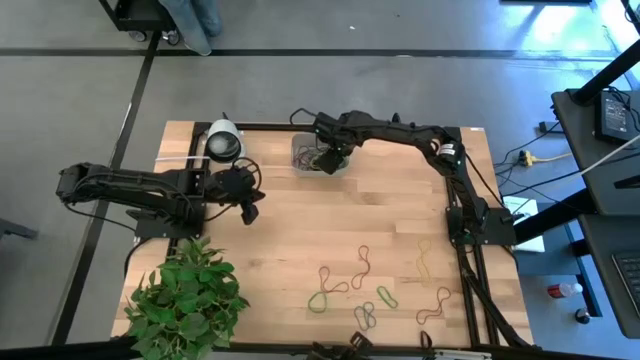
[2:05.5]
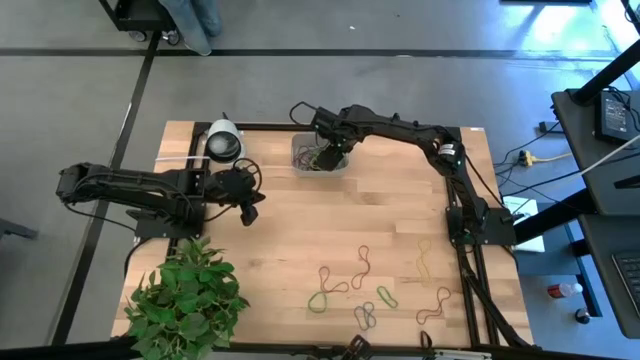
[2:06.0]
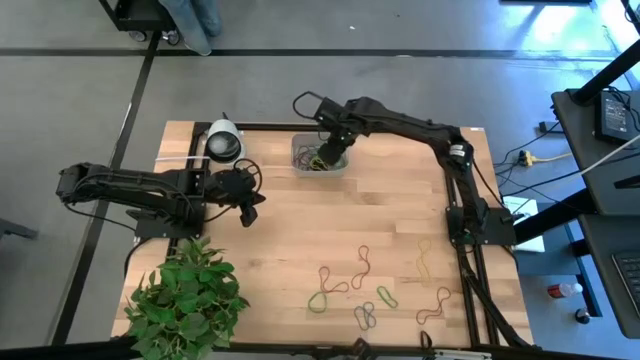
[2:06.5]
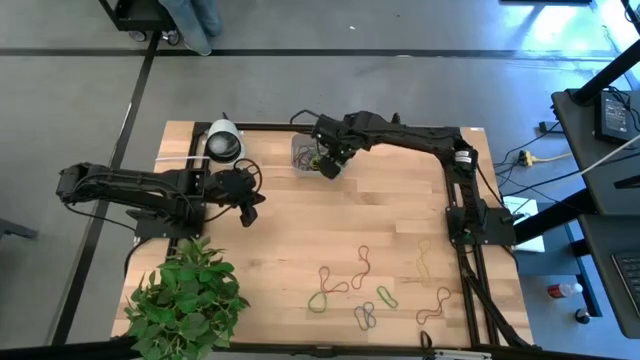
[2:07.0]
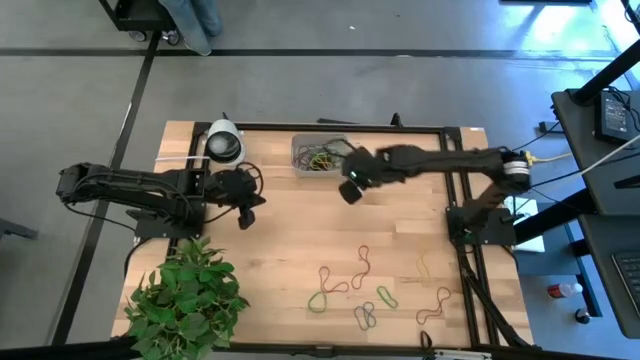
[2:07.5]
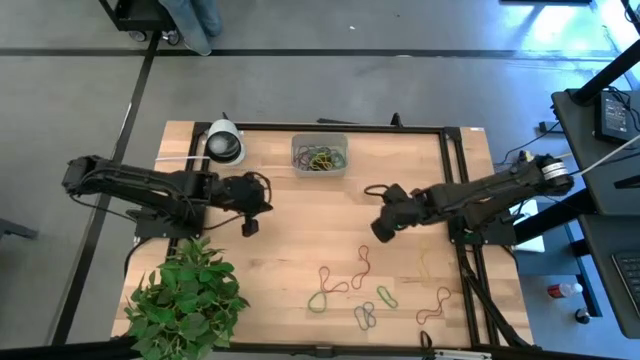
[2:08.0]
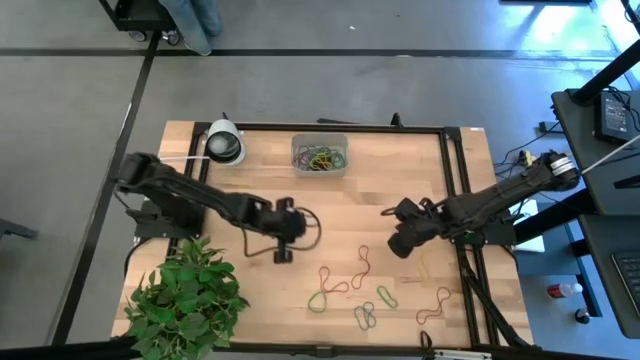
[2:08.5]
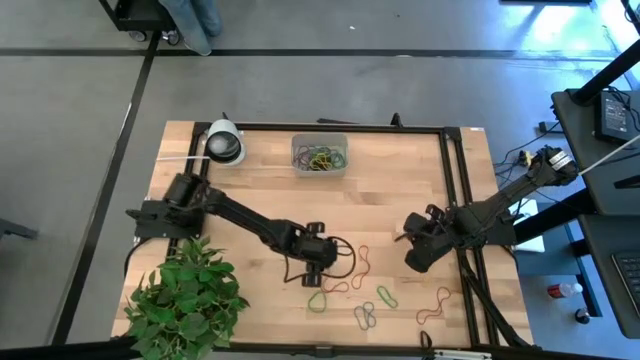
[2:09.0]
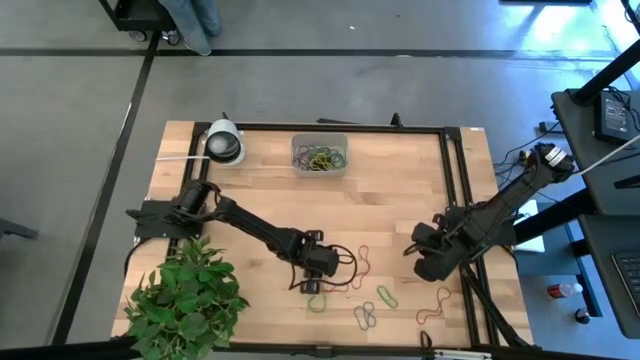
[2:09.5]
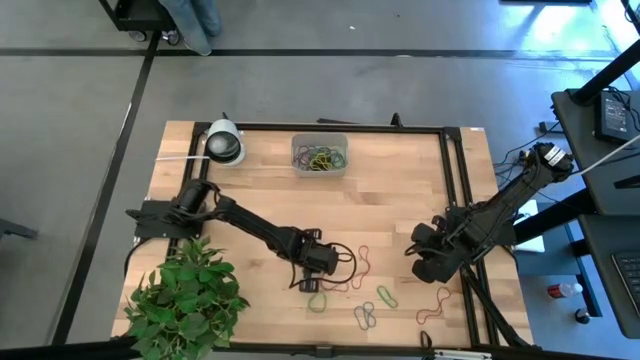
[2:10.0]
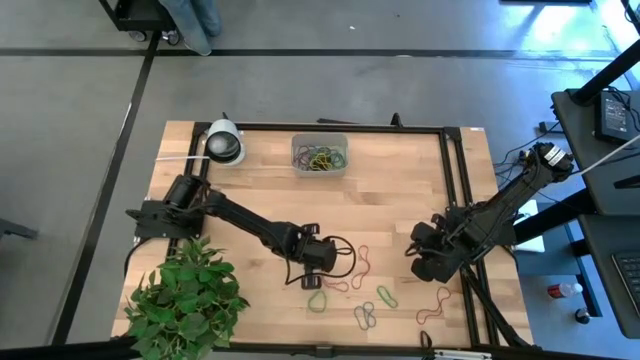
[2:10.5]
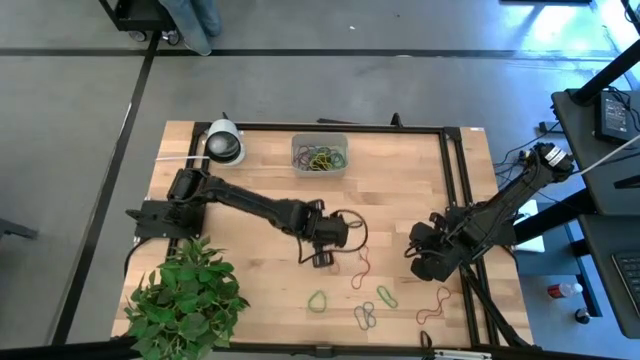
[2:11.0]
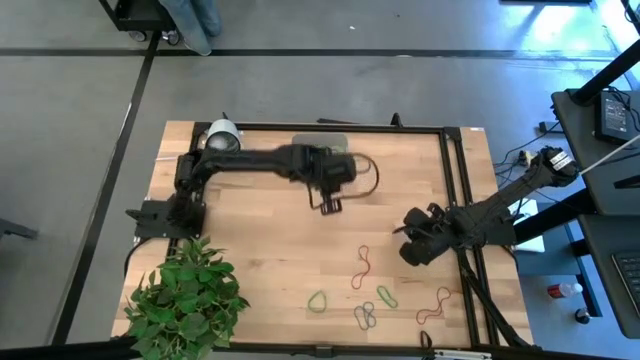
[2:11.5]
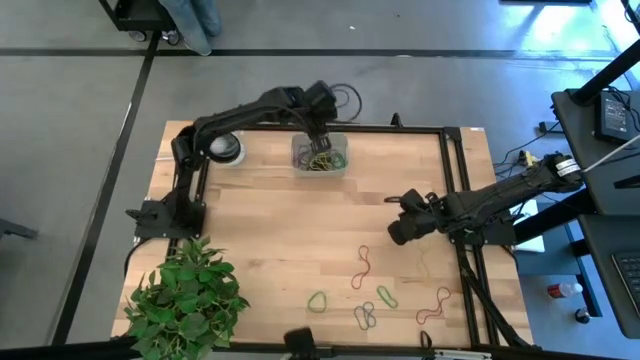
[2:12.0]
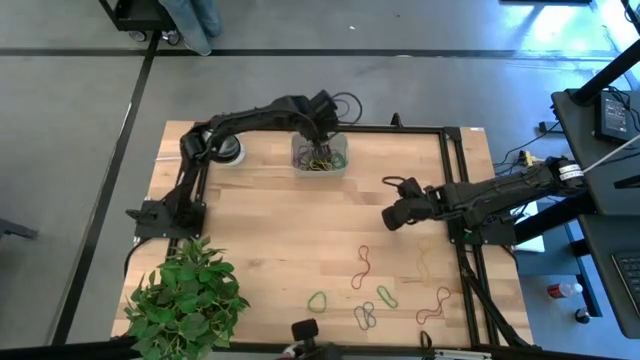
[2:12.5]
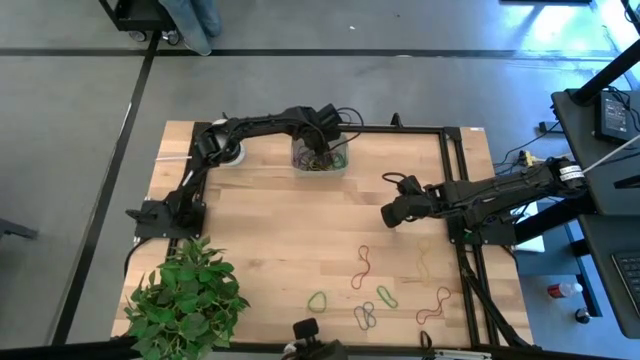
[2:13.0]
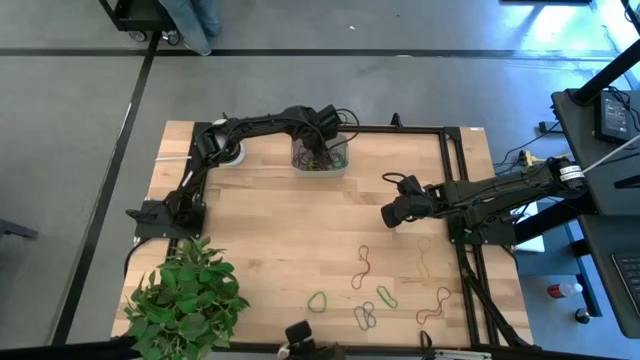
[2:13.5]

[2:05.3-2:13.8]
Task: Pick and place rubber bands into bin
Put the red rubber band into the white bin

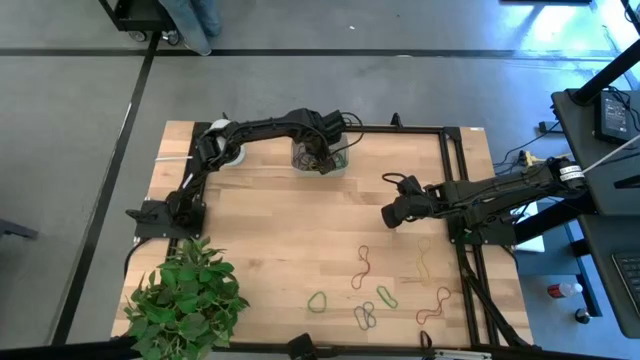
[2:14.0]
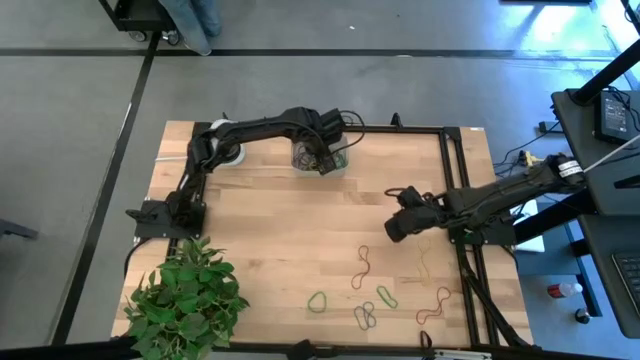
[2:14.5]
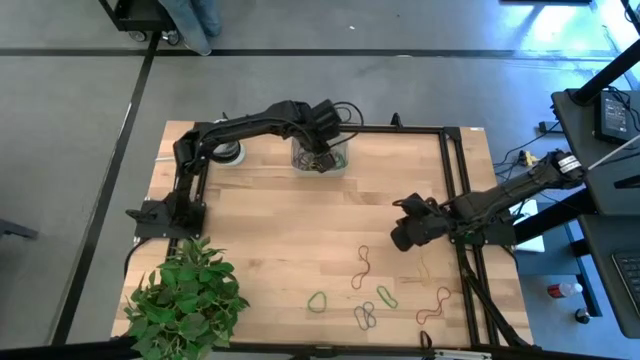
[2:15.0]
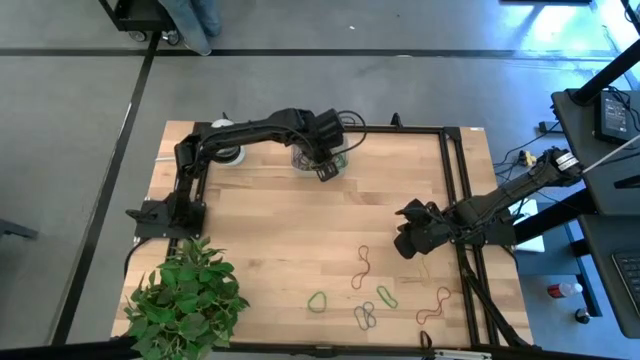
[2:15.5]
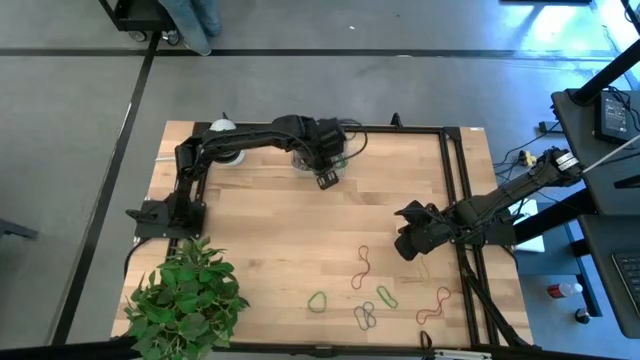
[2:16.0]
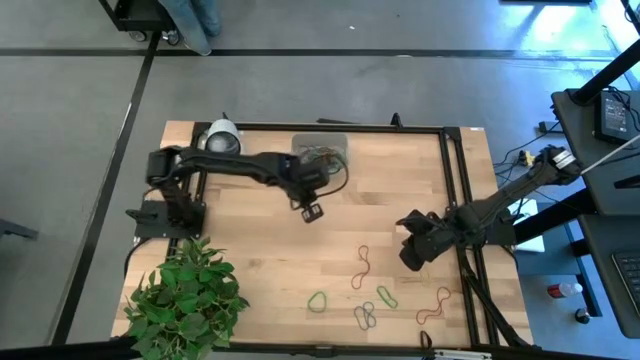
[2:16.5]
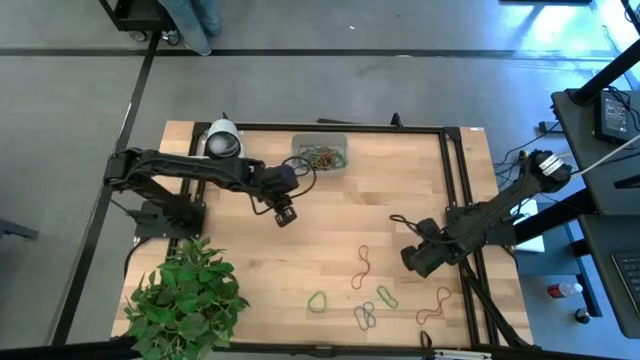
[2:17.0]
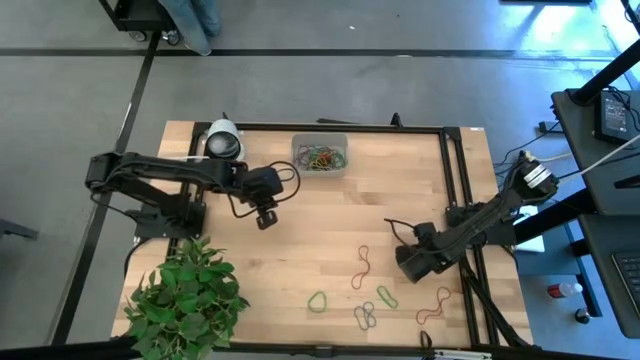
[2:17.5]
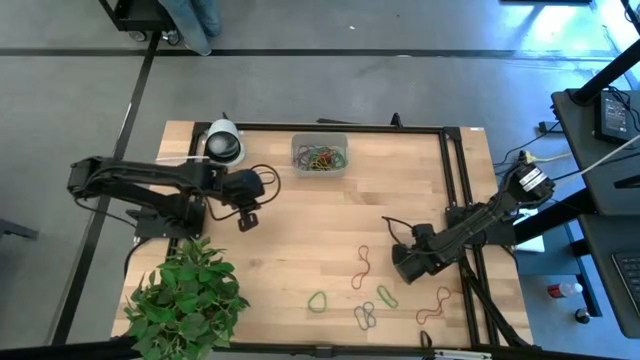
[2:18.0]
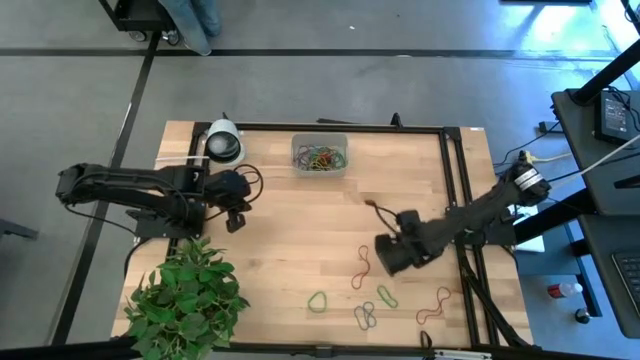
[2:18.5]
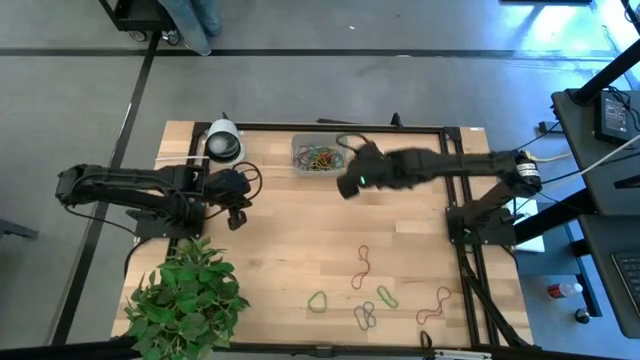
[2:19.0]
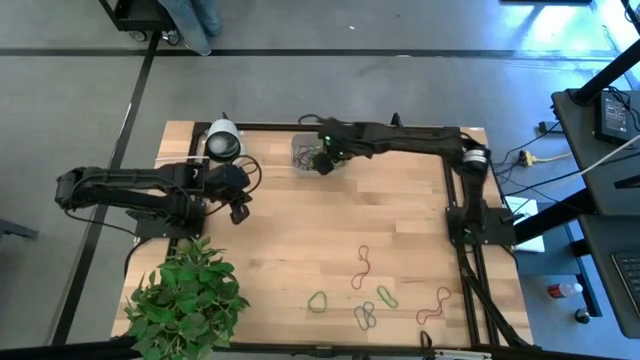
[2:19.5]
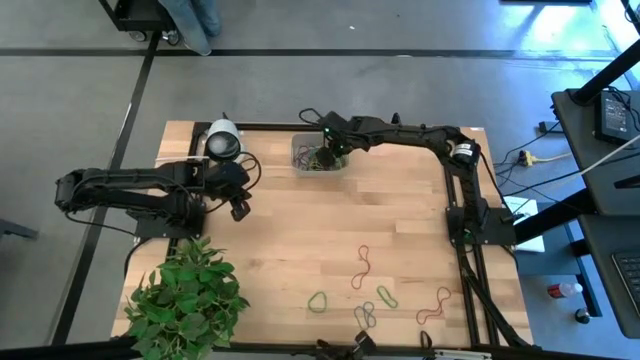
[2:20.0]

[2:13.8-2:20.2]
Put the yellow rubber band into the white bin

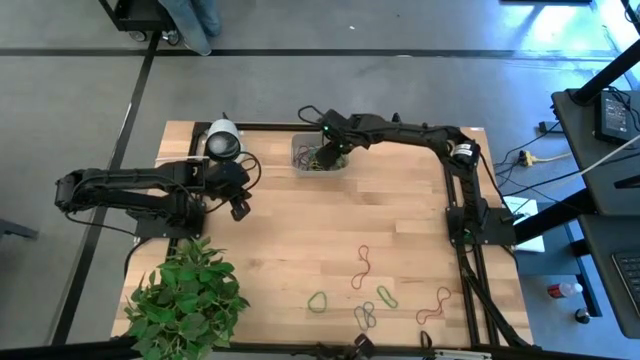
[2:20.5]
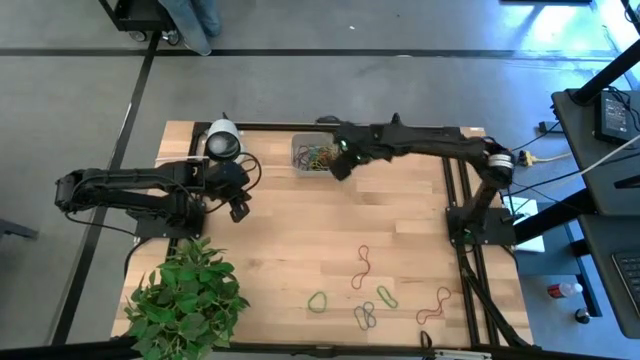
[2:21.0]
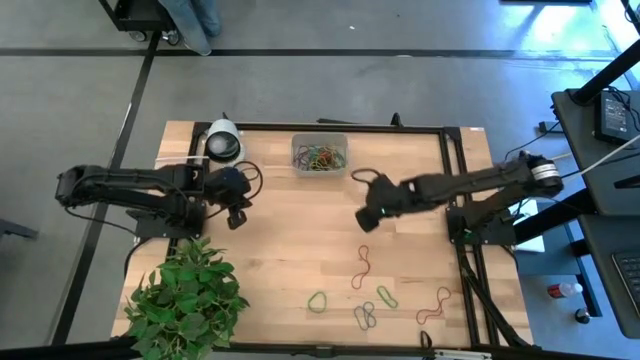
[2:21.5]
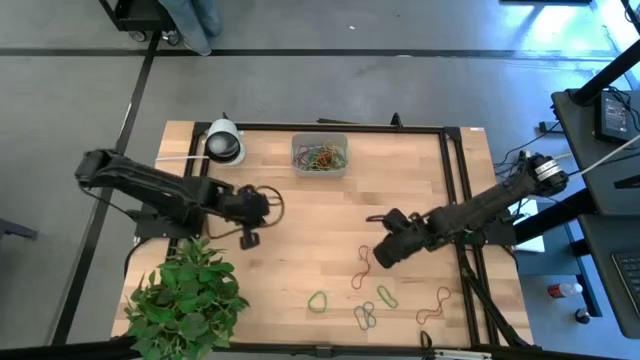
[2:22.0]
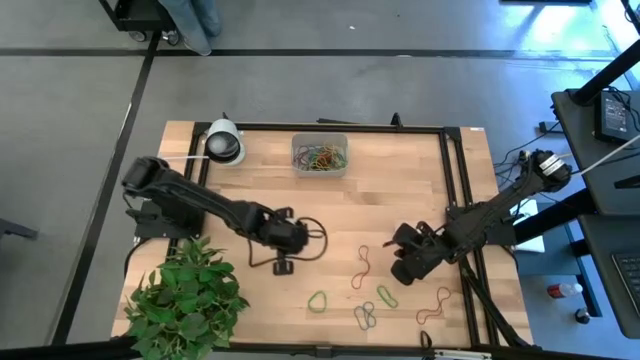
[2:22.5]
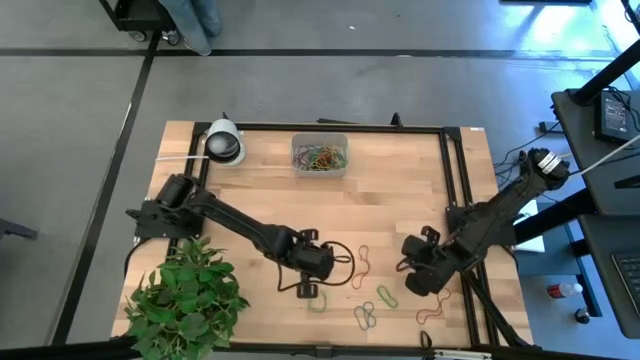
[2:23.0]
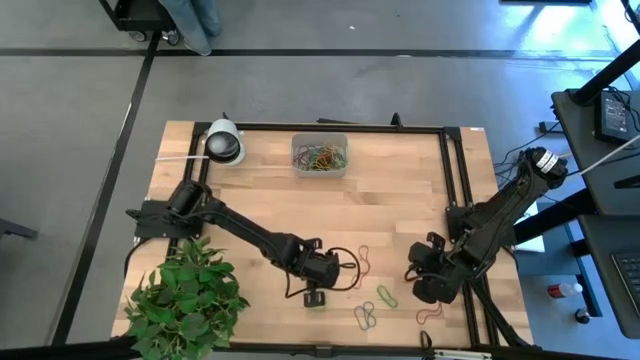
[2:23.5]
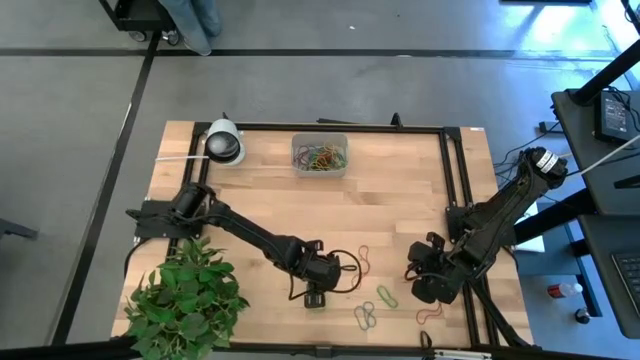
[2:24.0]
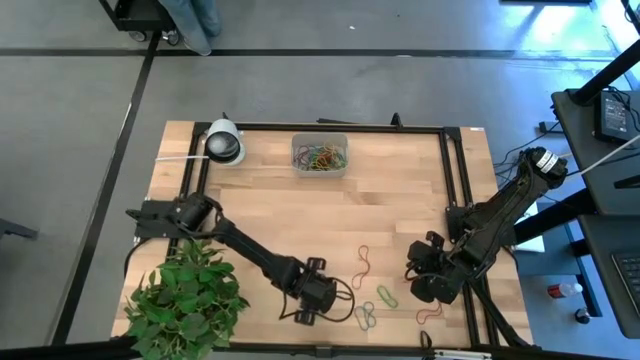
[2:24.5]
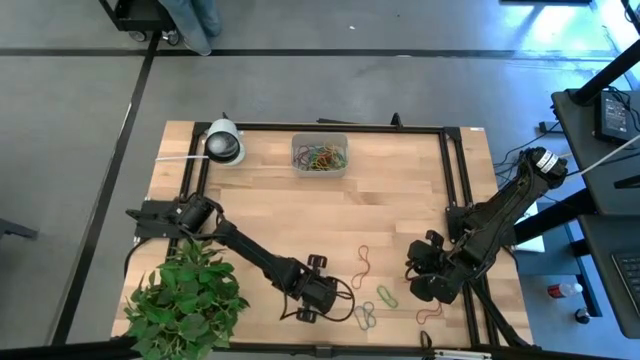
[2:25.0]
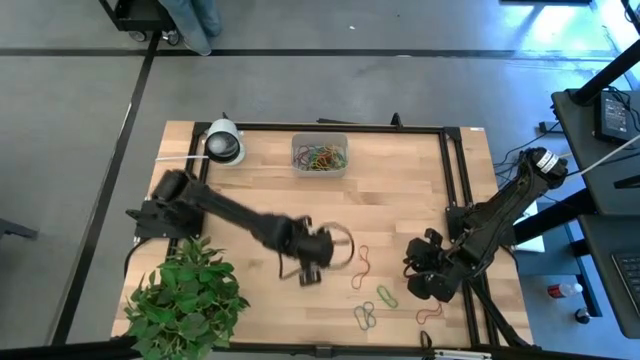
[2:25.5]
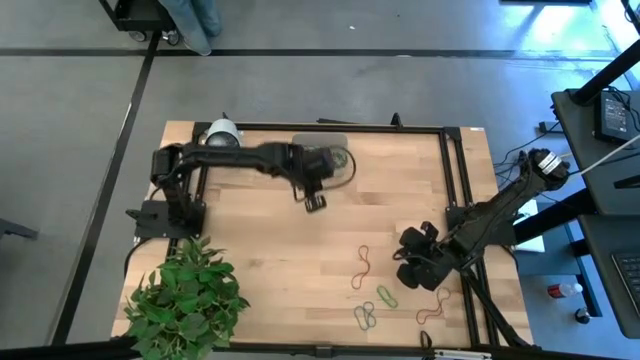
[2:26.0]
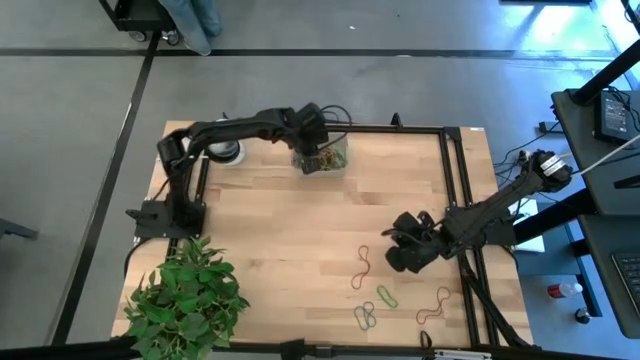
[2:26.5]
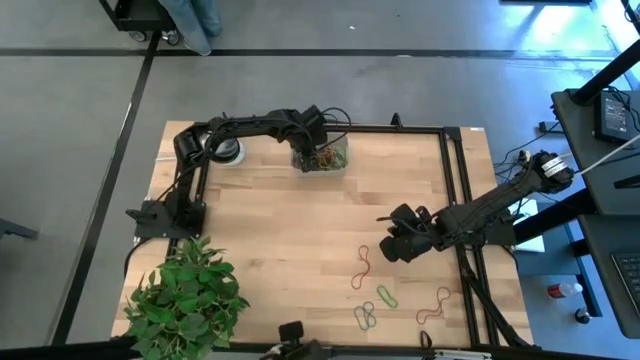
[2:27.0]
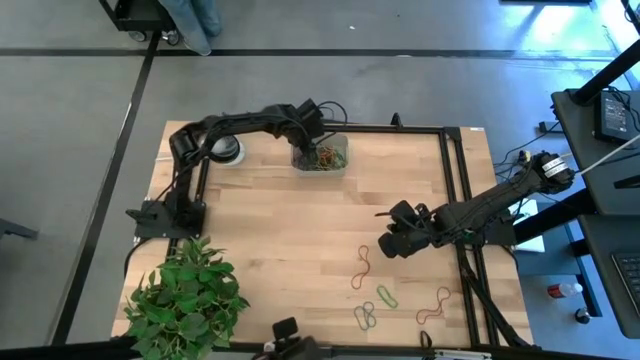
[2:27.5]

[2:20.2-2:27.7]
Put the green rubber band into the white bin
